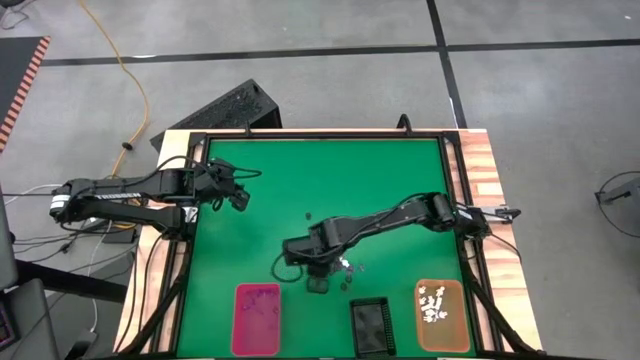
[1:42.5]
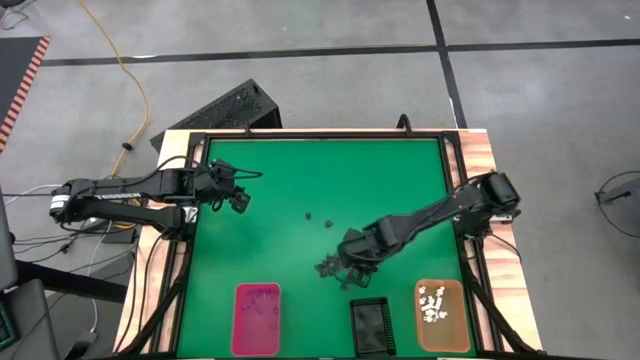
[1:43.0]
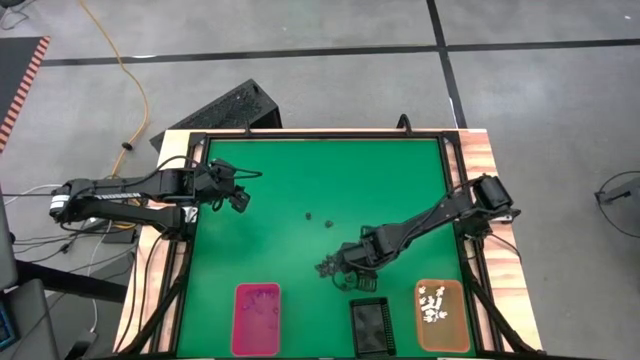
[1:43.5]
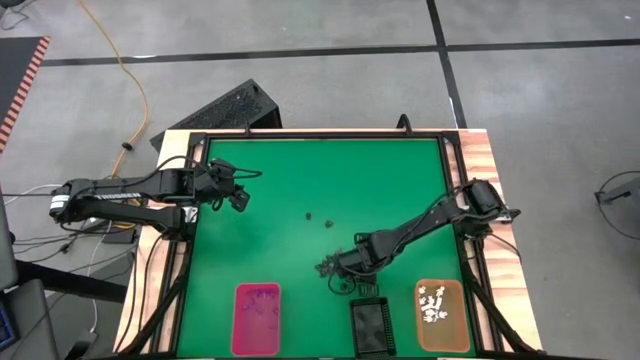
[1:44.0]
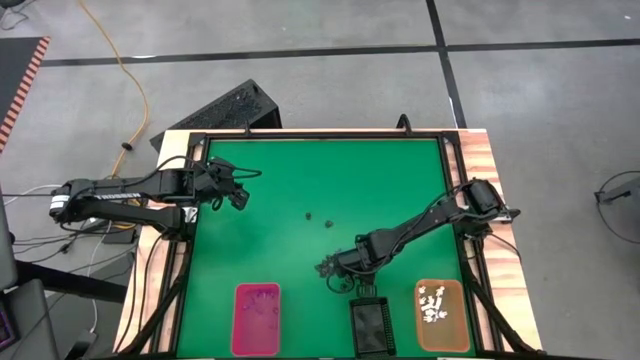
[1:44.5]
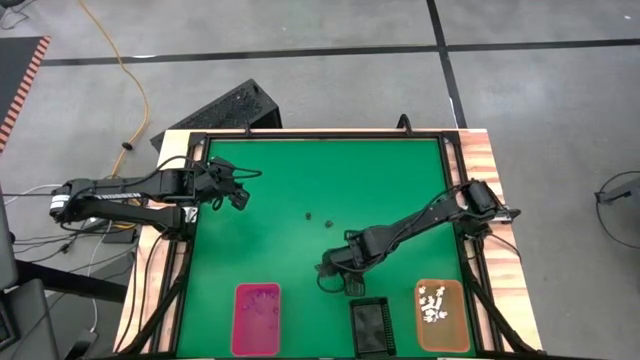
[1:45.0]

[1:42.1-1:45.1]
Task: Sort Halloween decoration
Put the violet witch hat toy into the red organizing bin

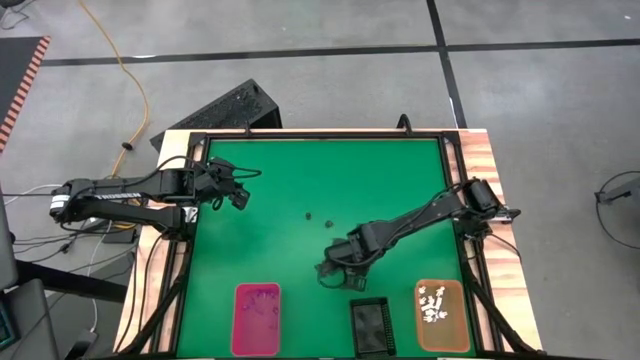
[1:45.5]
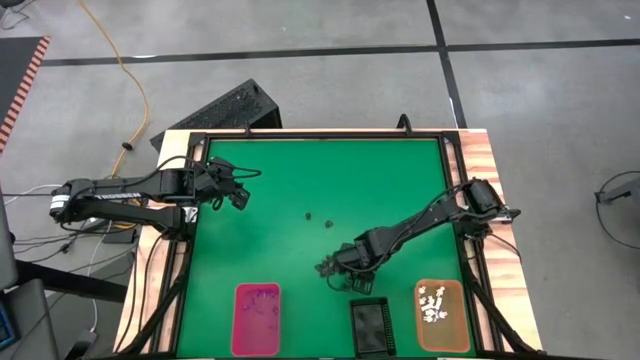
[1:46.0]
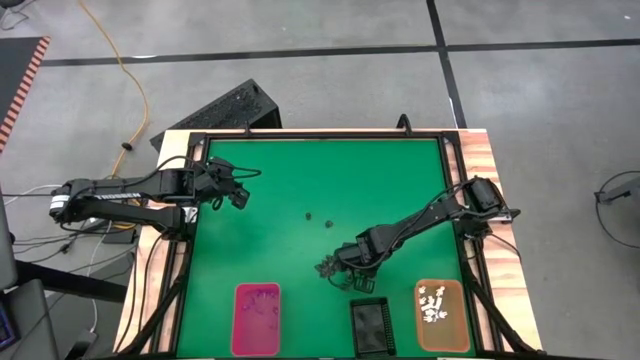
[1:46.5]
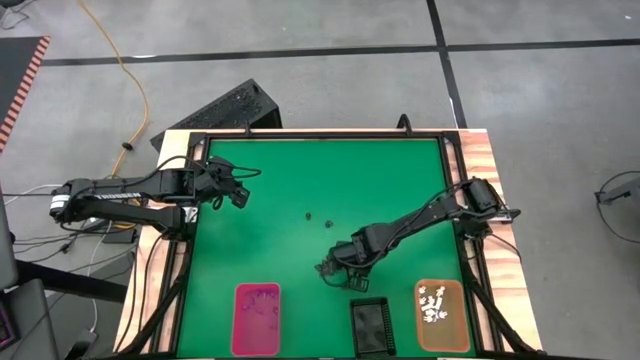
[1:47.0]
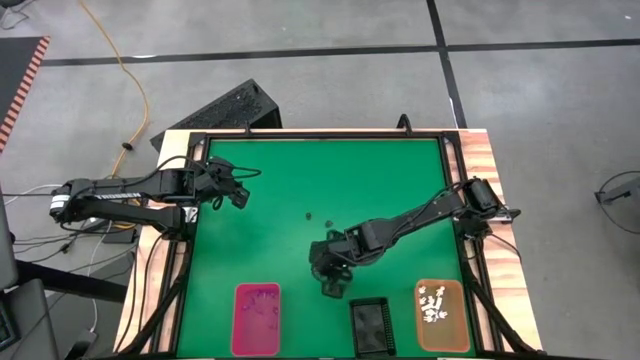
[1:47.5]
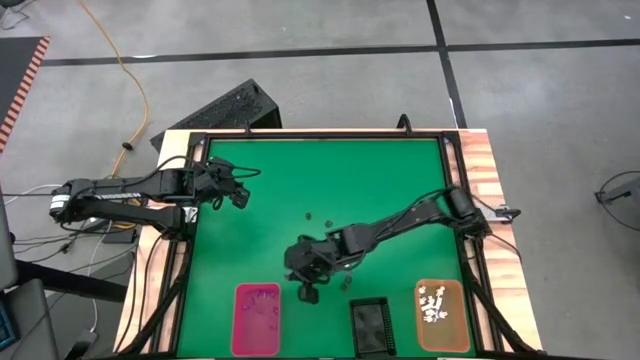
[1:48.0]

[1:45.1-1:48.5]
Put the violet witch hat toy into the red organizing bin

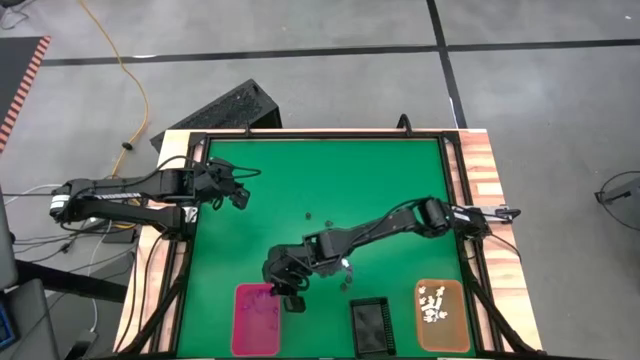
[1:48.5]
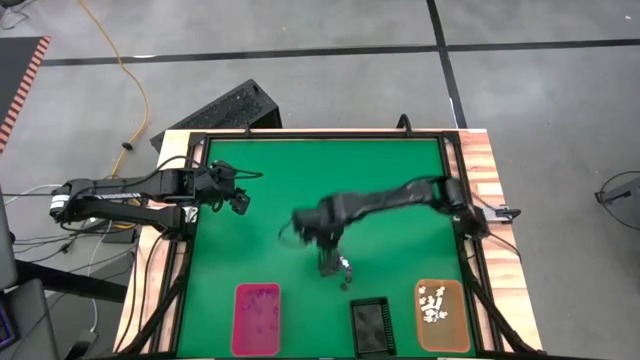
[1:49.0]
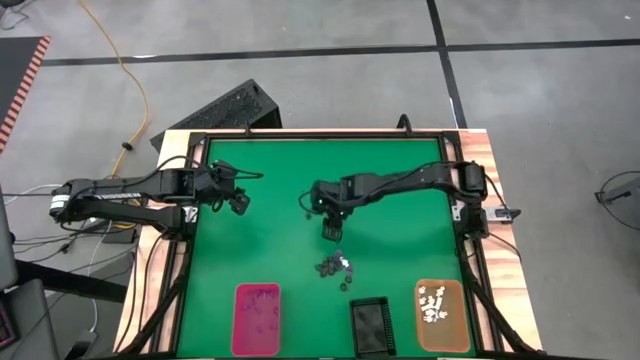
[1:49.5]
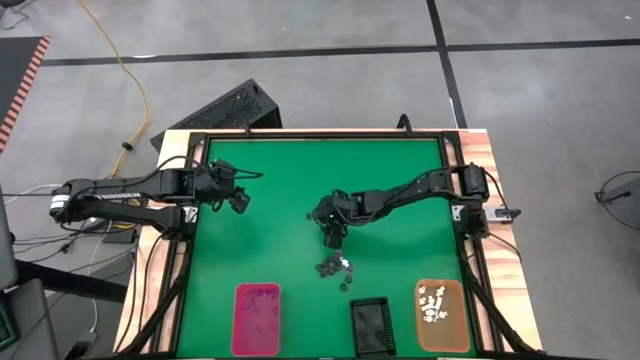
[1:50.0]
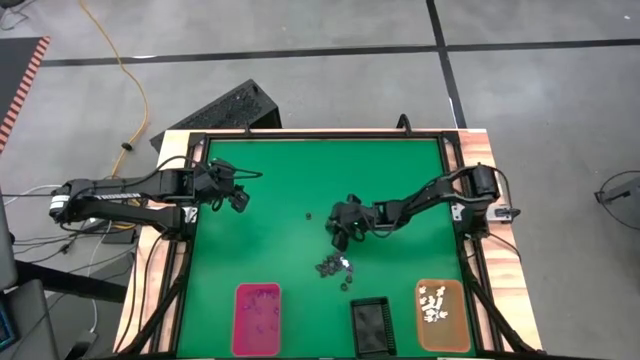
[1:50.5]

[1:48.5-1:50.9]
Put the black skull toy into the black organizing bin

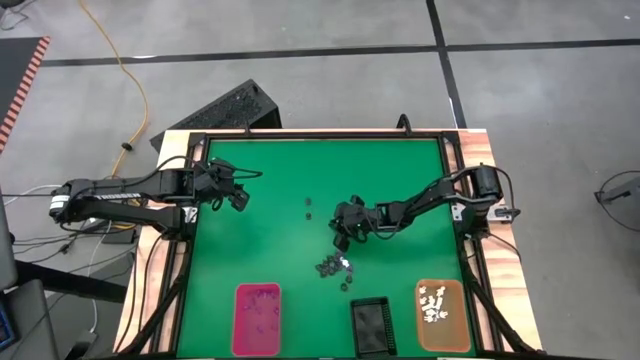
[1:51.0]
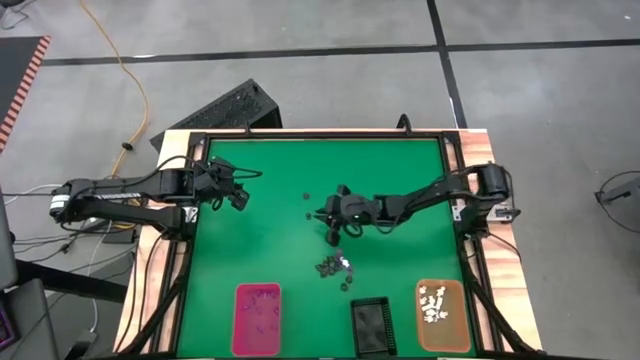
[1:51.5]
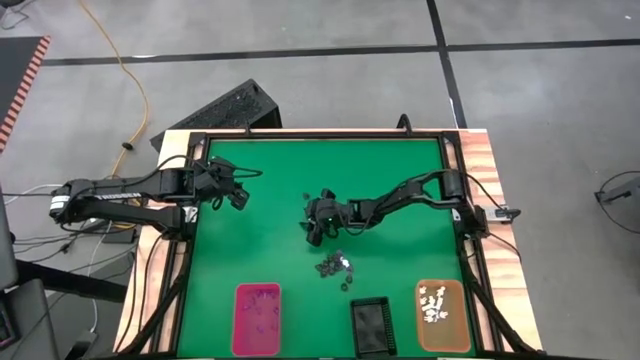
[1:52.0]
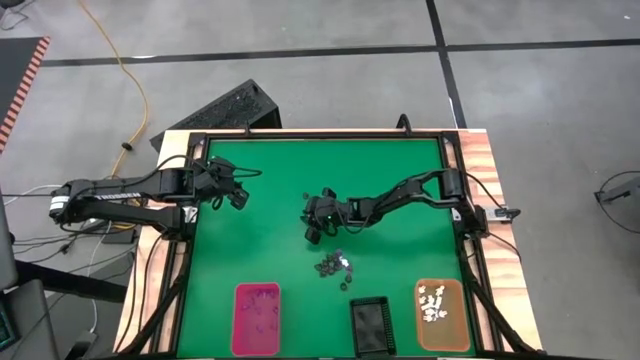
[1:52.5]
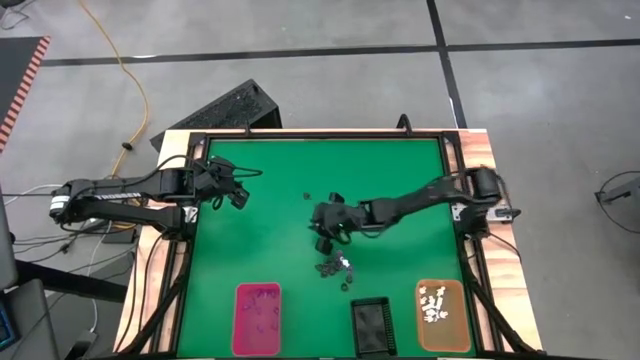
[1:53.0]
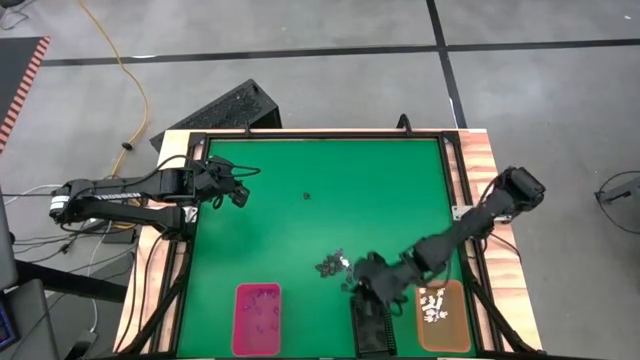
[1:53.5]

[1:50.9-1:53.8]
Put the black skull toy into the black organizing bin

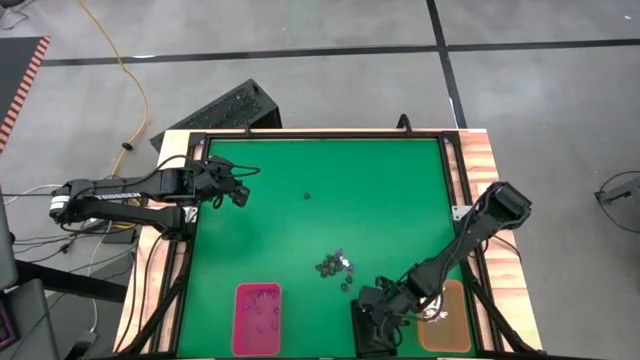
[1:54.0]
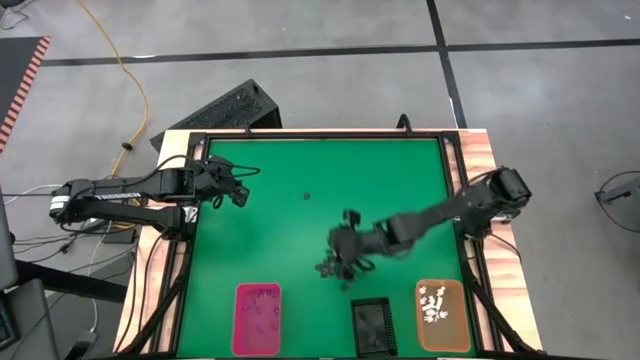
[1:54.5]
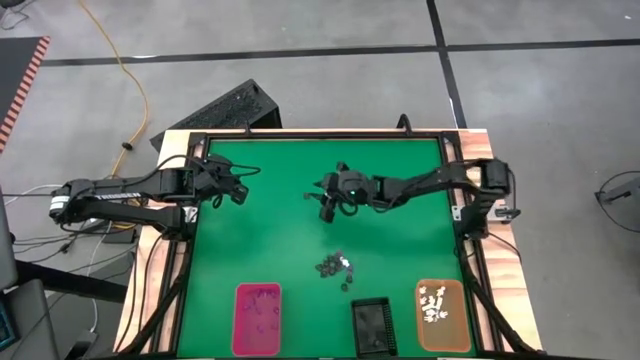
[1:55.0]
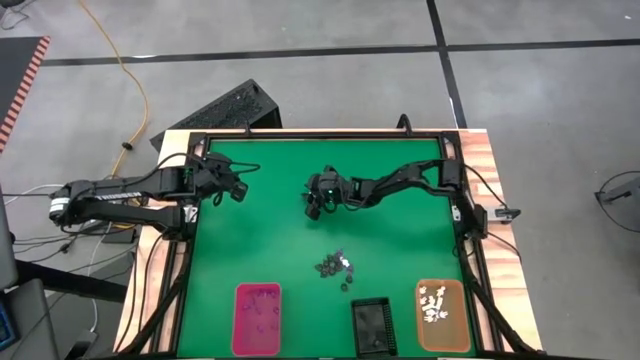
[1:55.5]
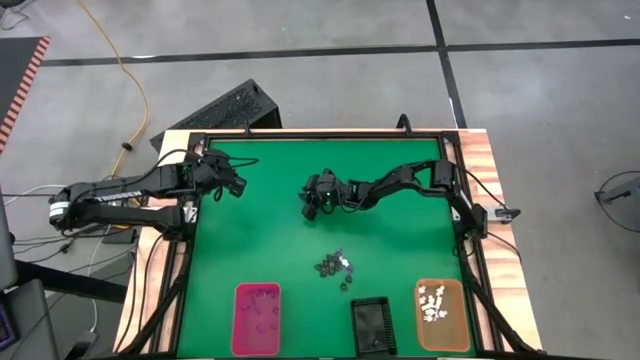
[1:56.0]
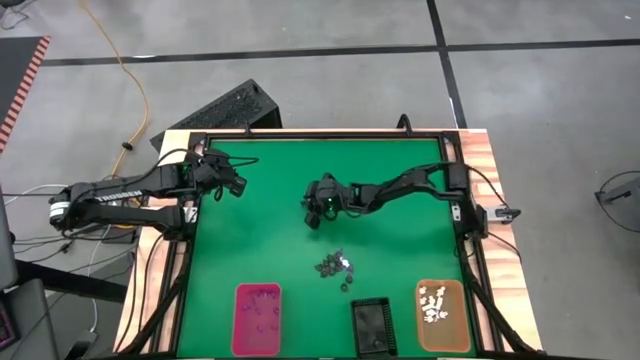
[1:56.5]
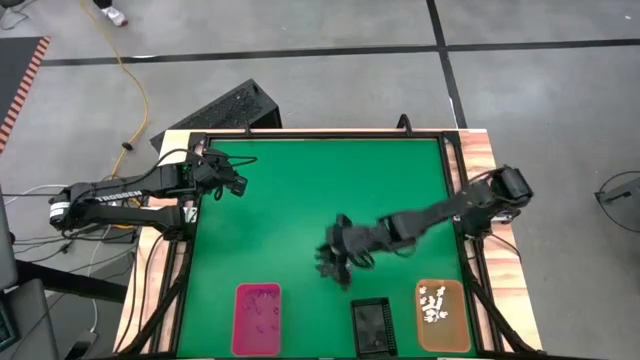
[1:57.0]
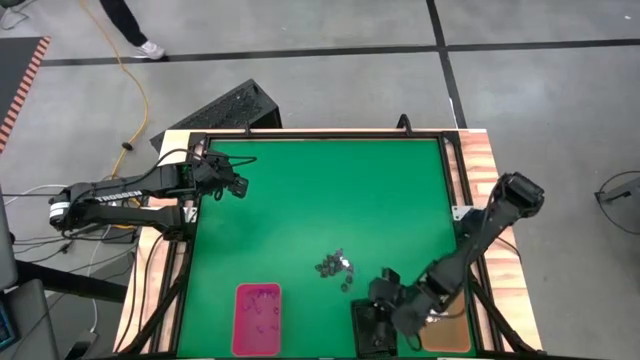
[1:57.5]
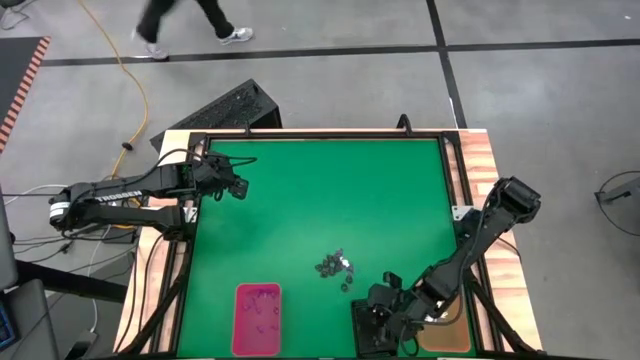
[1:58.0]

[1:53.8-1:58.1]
Put the black skull toy into the black organizing bin

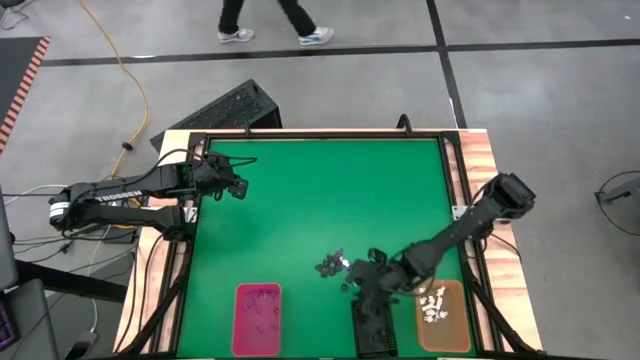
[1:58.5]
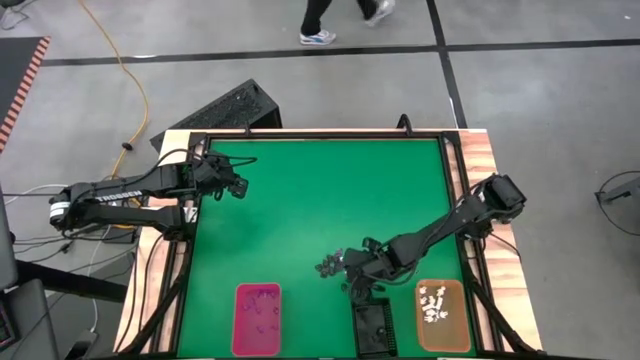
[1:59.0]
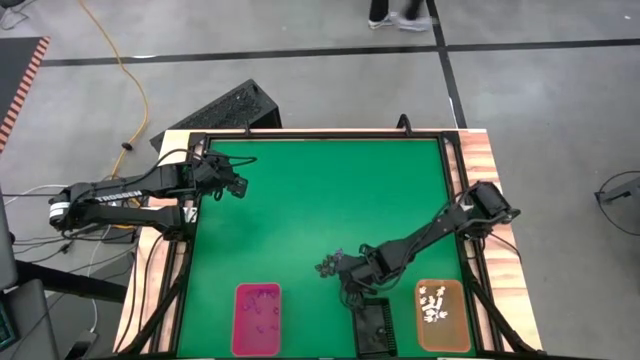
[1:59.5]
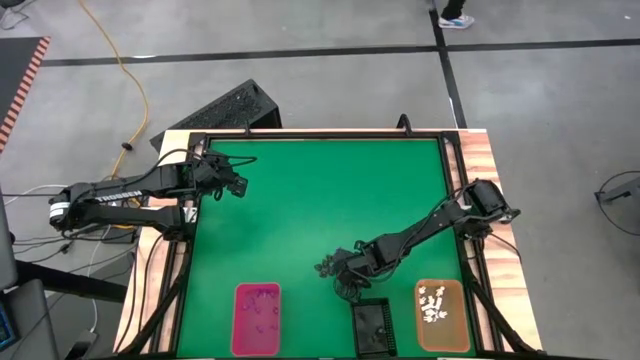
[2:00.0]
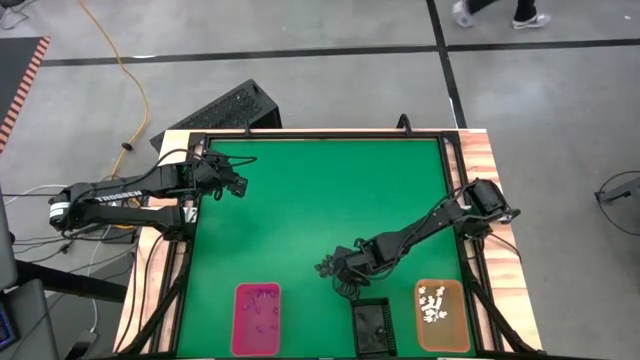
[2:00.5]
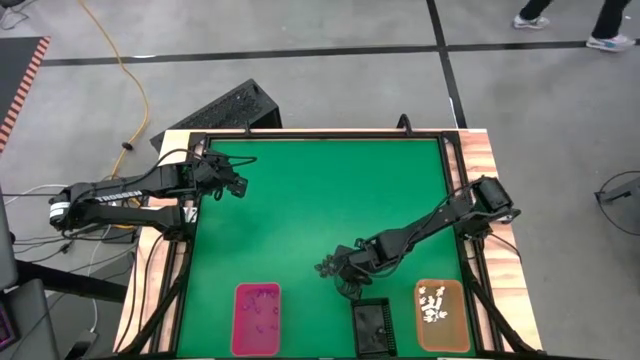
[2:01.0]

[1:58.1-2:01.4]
Put the black skull toy into the black organizing bin

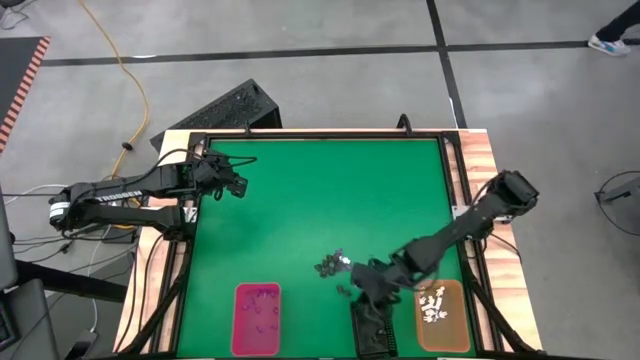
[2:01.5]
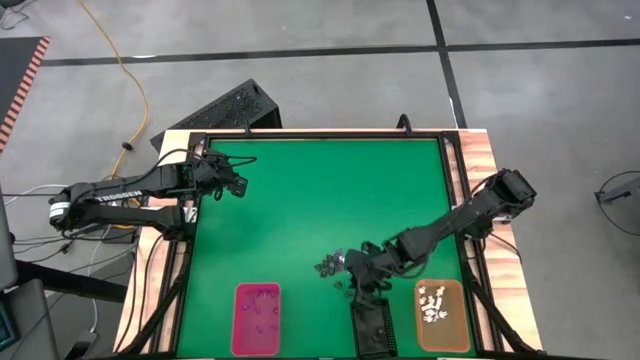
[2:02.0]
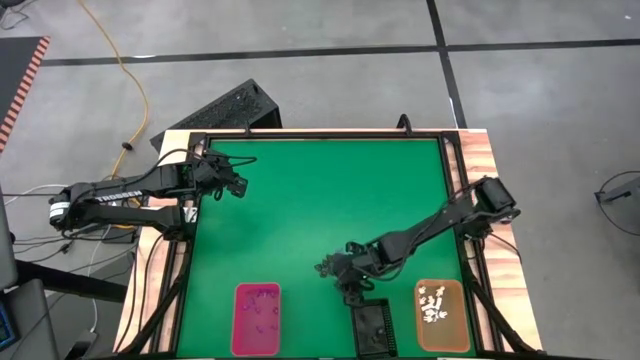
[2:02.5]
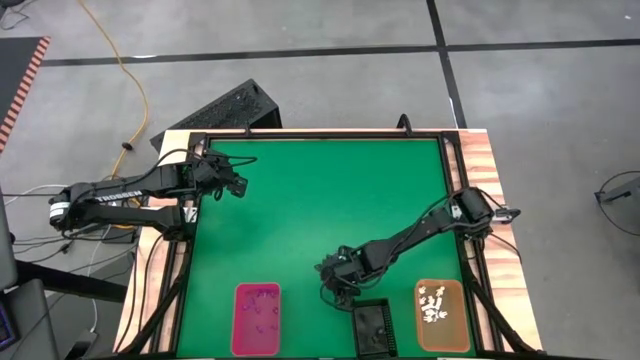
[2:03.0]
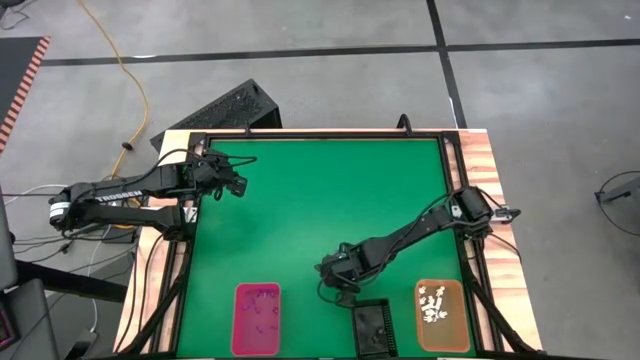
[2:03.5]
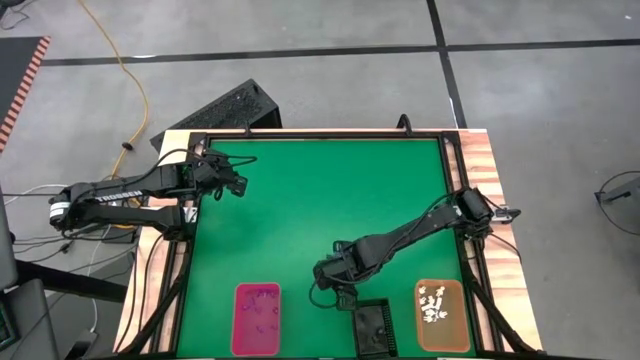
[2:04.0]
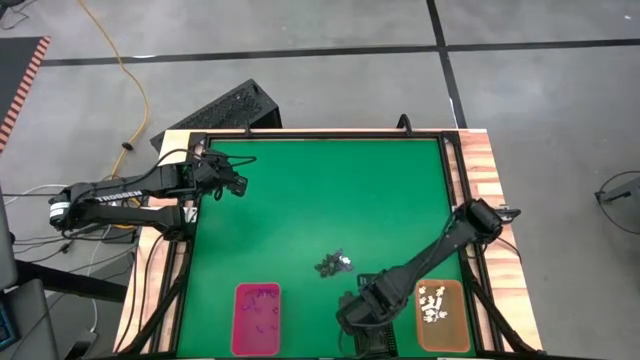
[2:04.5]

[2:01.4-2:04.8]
Put the black skull toy into the black organizing bin
